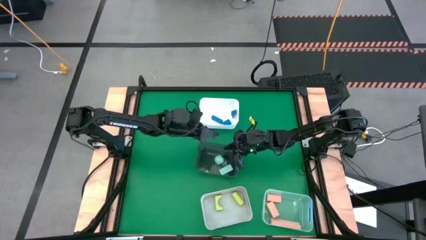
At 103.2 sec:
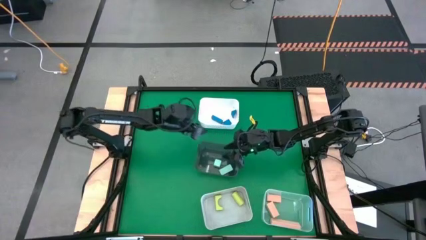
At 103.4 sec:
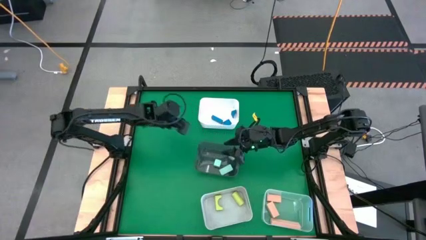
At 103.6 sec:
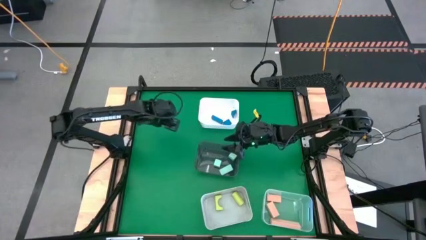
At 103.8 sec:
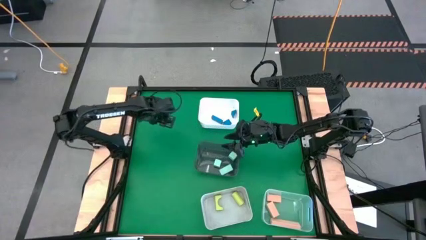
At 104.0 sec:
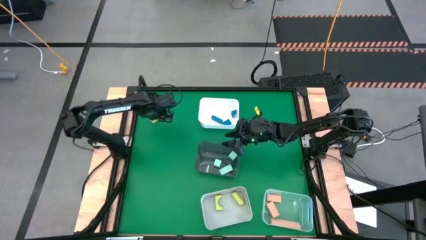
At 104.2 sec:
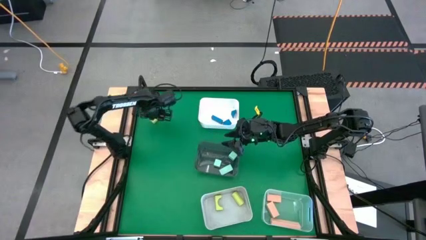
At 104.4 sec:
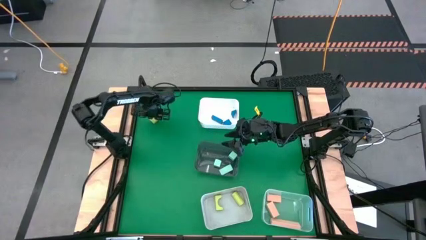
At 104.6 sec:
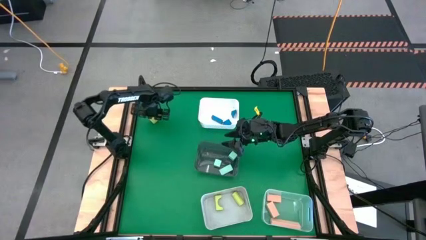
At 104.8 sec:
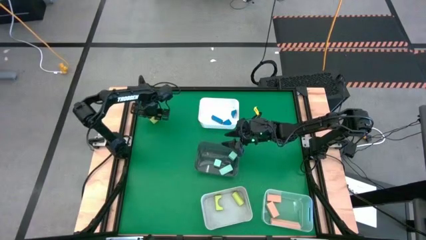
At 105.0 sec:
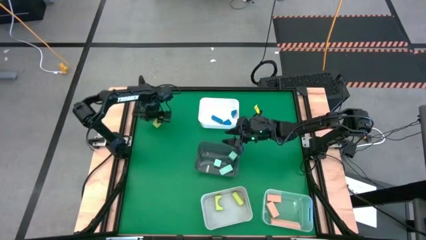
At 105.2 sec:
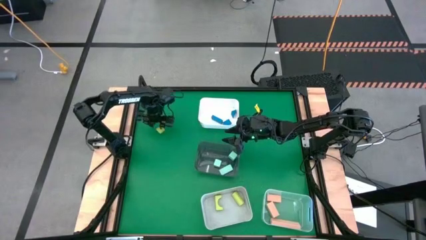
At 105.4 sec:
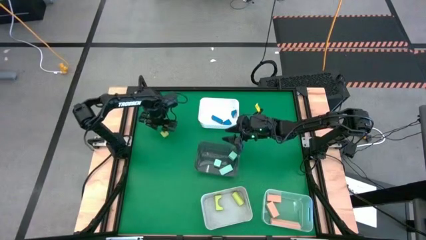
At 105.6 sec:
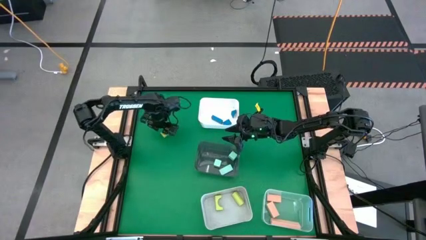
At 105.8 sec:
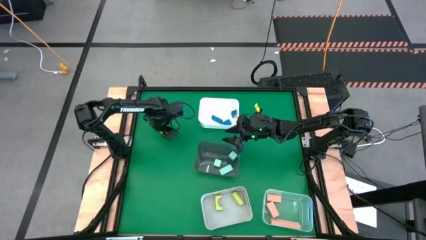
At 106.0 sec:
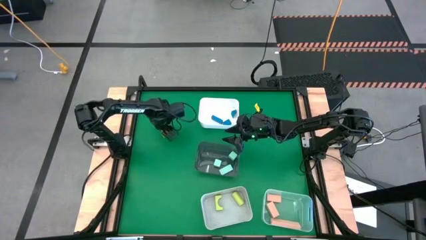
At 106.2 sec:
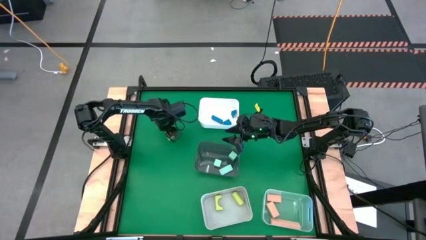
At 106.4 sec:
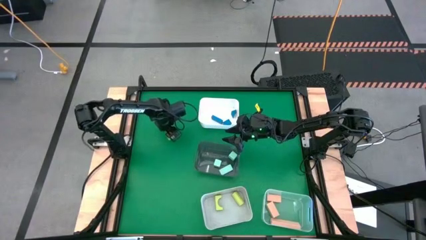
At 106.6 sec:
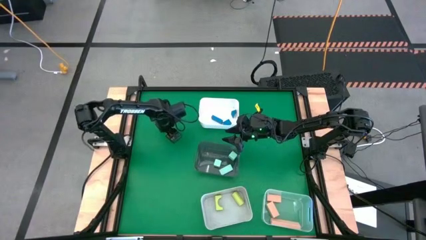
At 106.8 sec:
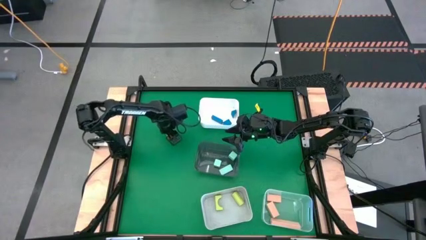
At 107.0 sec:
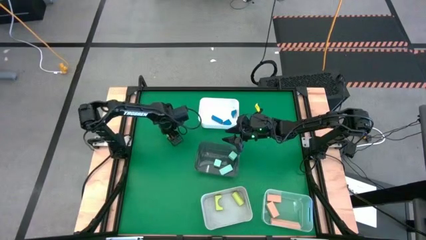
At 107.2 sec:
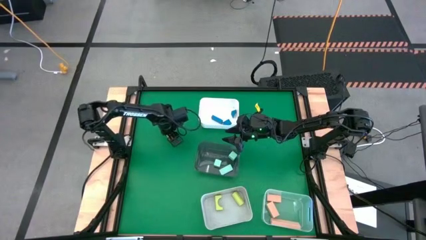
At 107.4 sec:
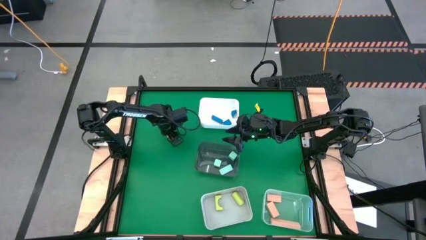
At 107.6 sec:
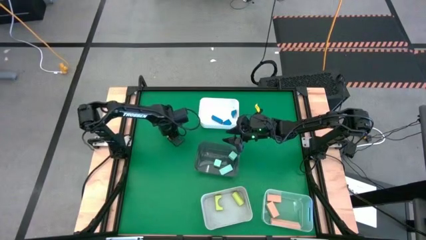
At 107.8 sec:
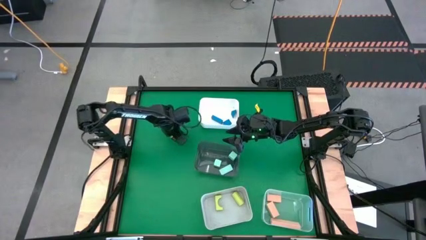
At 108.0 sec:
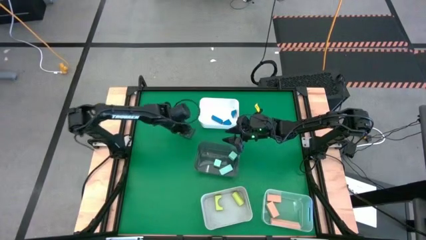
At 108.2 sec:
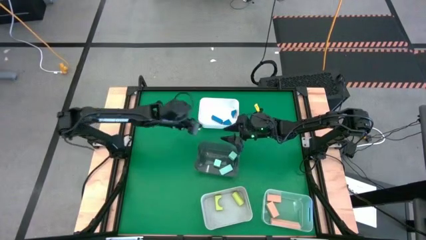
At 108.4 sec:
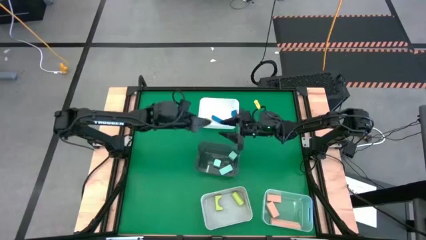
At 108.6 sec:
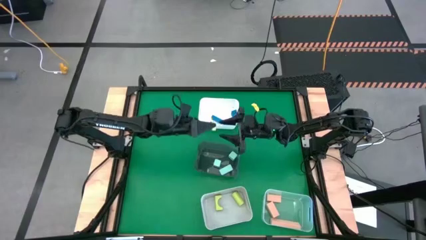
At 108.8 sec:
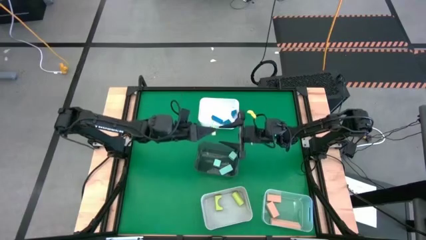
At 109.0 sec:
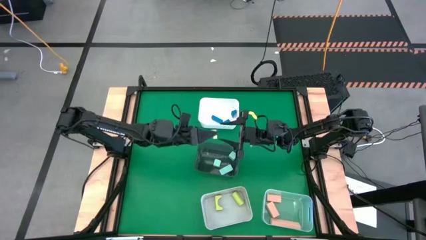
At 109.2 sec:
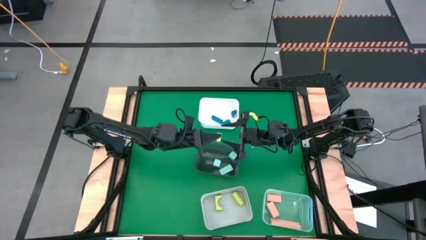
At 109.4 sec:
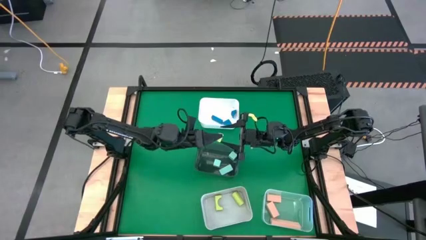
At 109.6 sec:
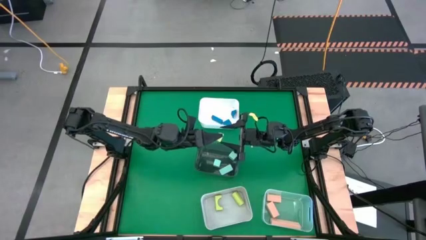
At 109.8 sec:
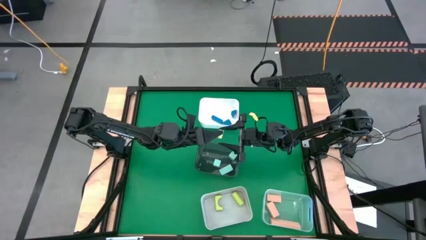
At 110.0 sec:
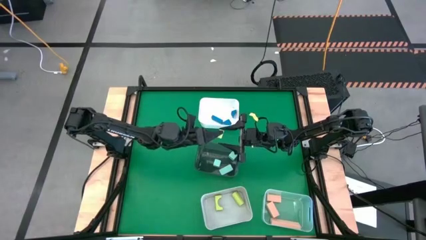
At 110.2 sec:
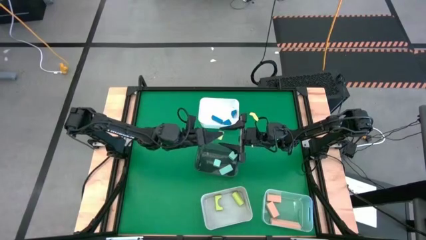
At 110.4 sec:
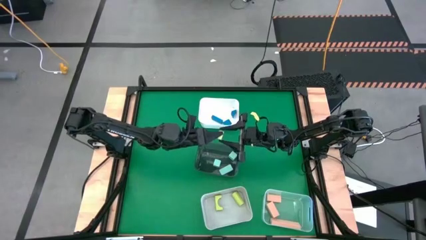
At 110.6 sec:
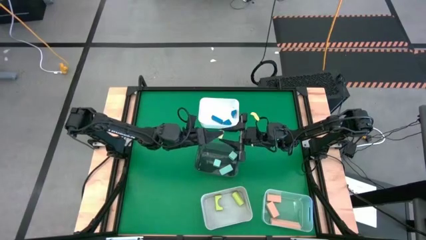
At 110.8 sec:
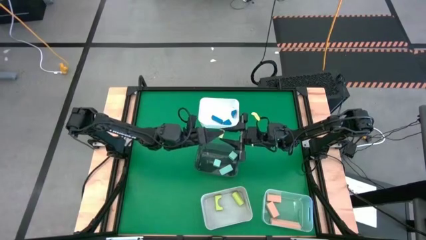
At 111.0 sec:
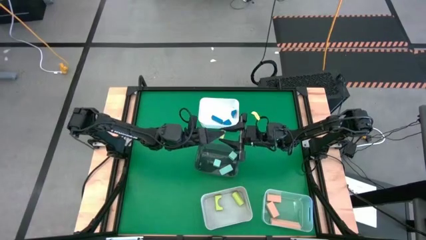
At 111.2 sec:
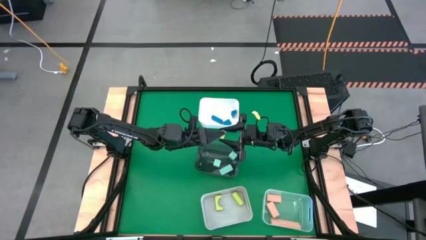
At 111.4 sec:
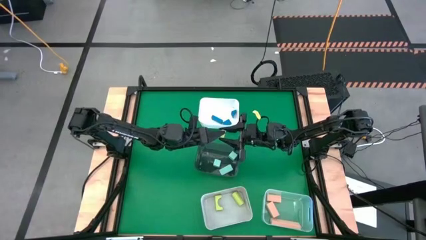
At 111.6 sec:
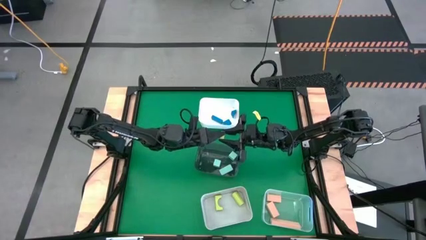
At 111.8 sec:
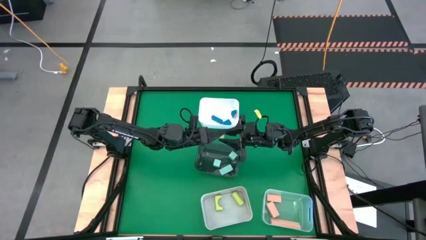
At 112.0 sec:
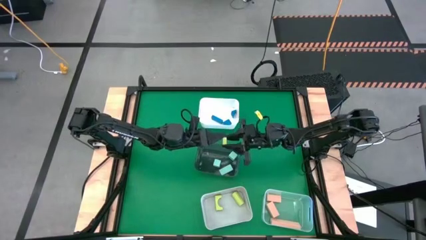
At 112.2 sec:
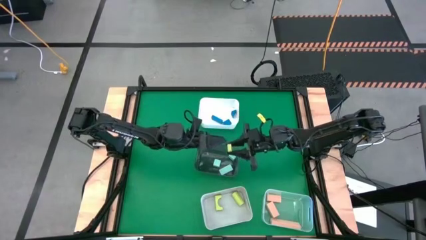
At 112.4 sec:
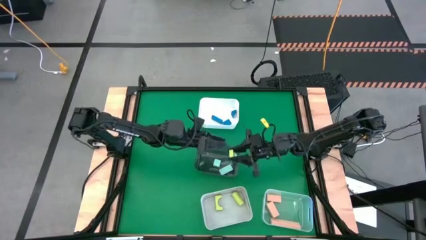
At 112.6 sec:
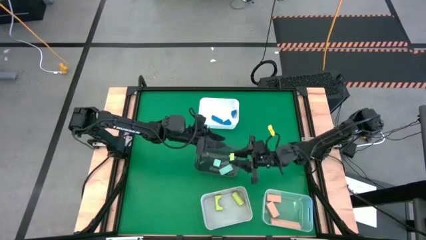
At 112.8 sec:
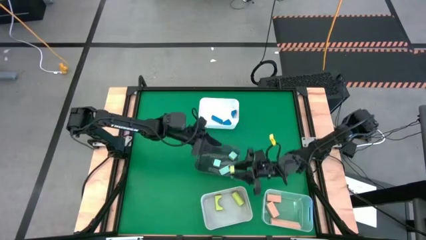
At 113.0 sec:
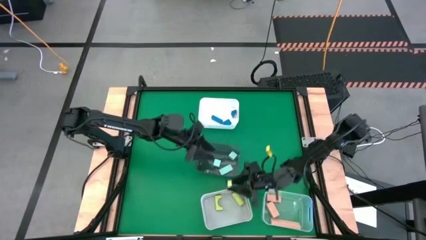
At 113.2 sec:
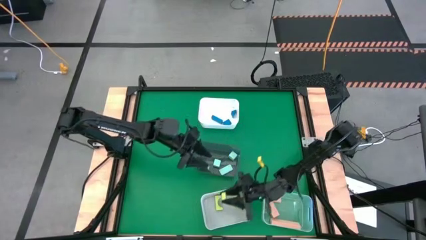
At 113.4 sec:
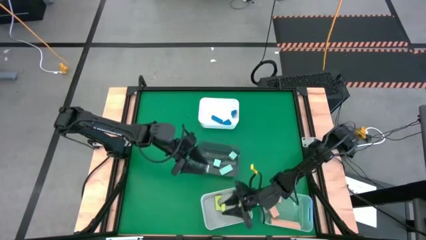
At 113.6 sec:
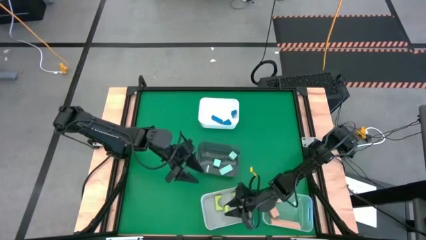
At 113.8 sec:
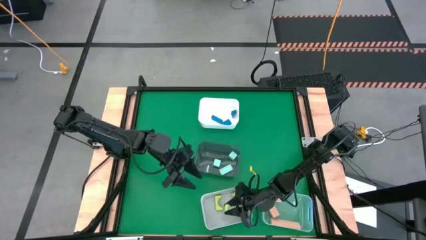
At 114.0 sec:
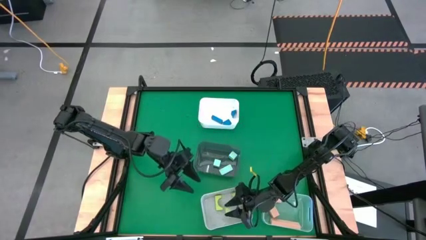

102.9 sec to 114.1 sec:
Task: Sort & place blocks by color
Put the light green block into the gray bin
